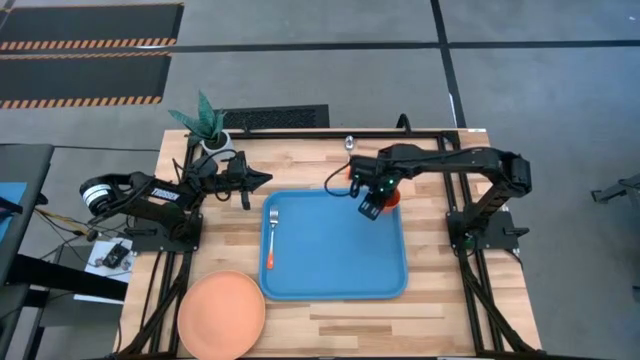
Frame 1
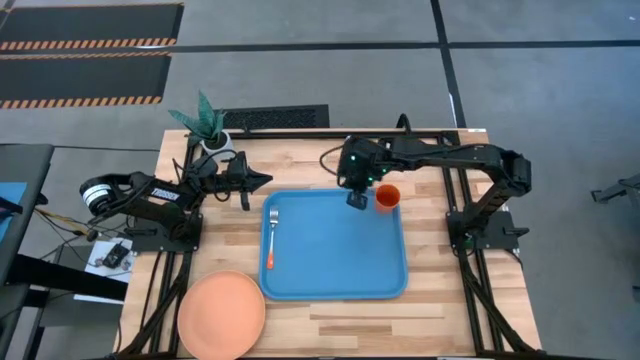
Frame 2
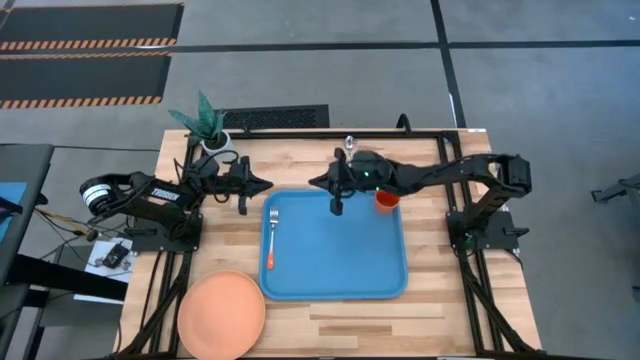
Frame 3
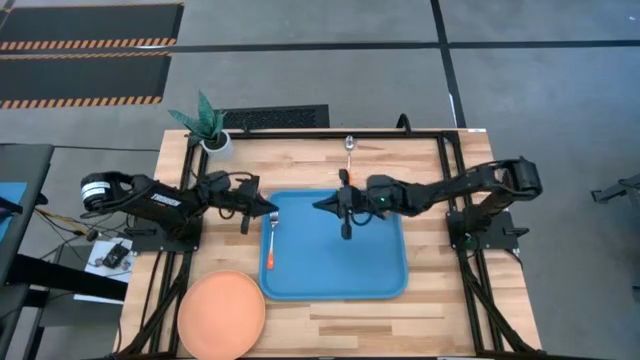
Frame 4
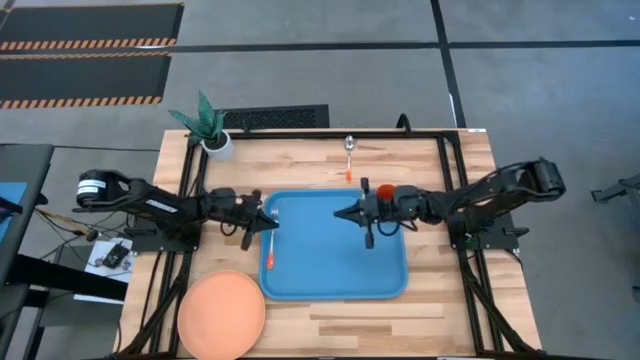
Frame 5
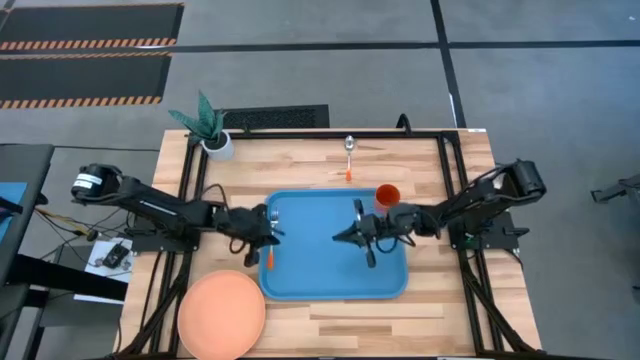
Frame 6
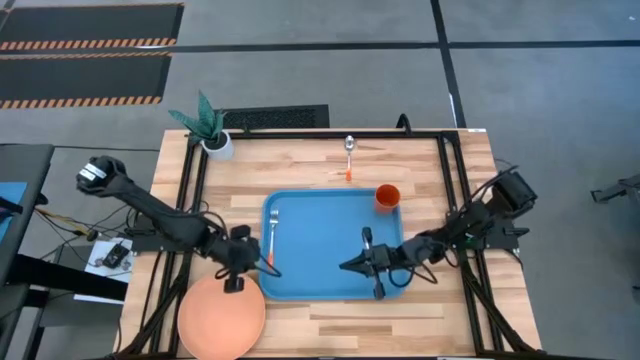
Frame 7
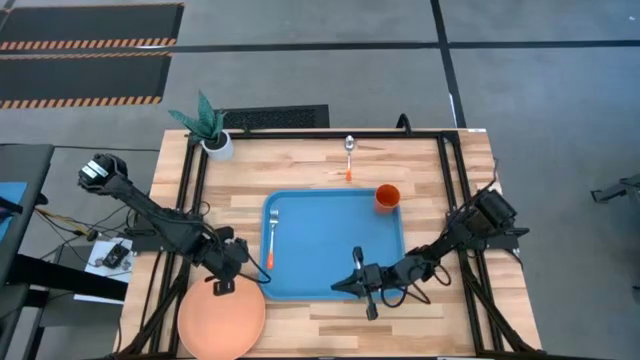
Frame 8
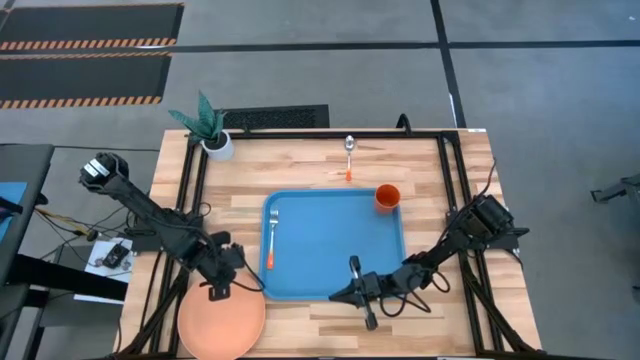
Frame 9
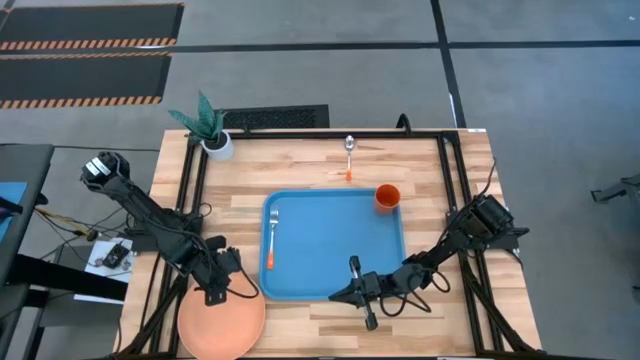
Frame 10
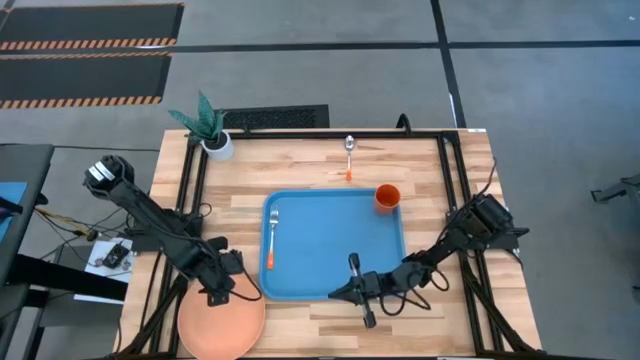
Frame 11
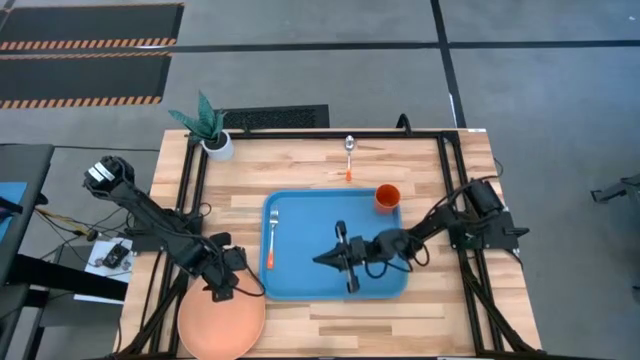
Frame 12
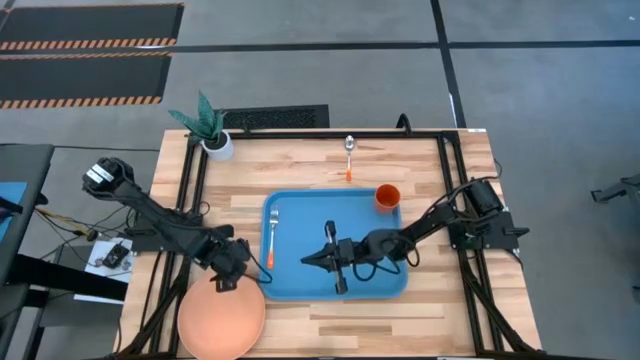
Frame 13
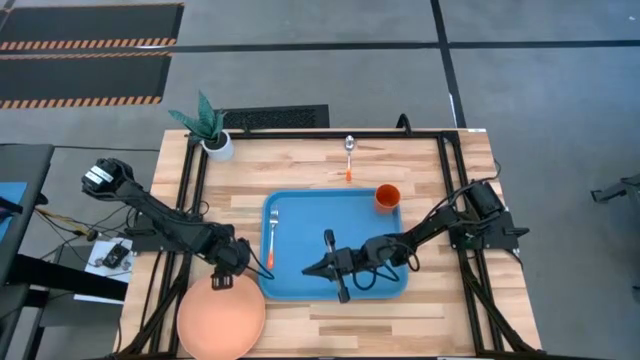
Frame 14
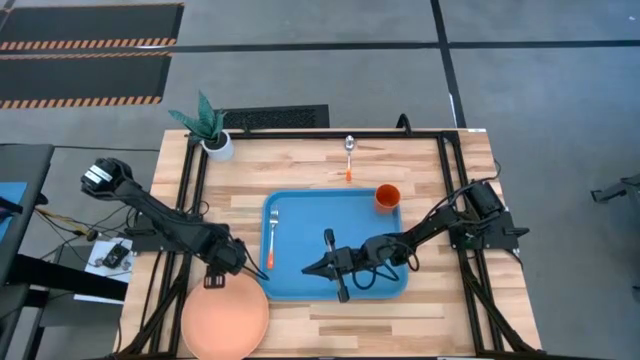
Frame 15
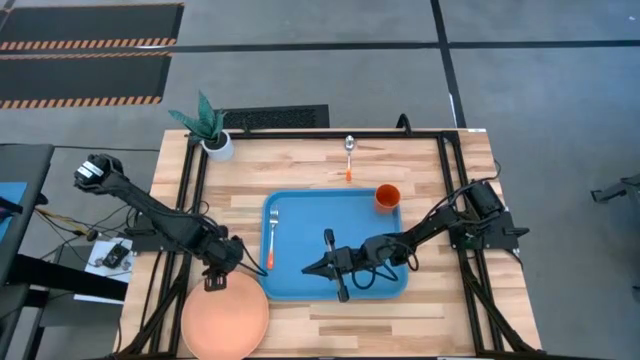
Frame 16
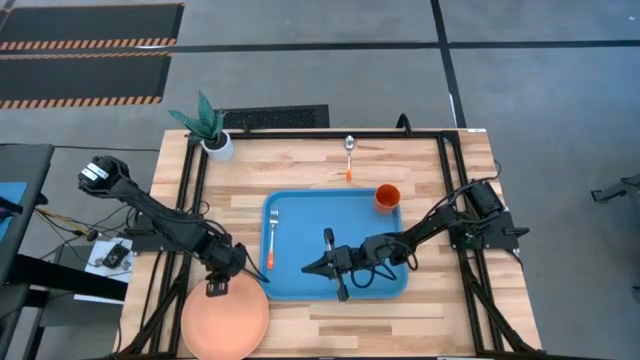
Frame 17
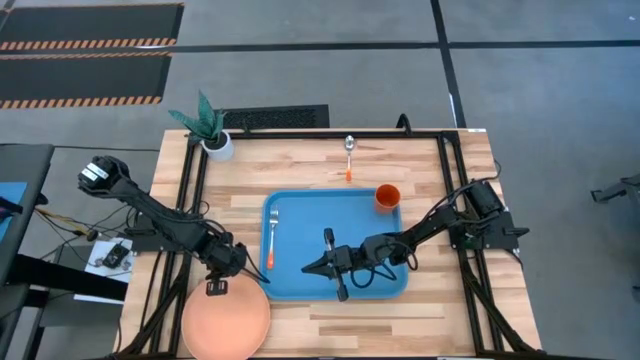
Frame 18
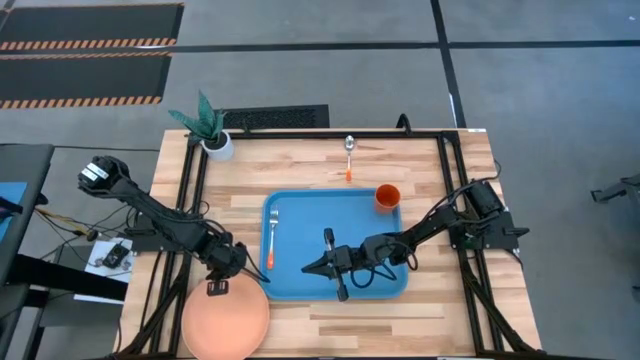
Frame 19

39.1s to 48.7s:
Task: Pick and place plate/cup/fork/spoon on tray
Put the orange plate on the blue serving tray

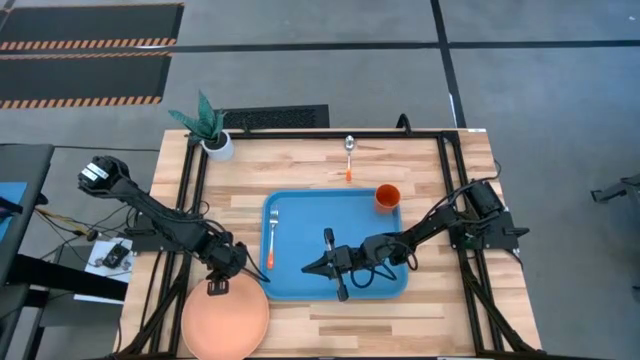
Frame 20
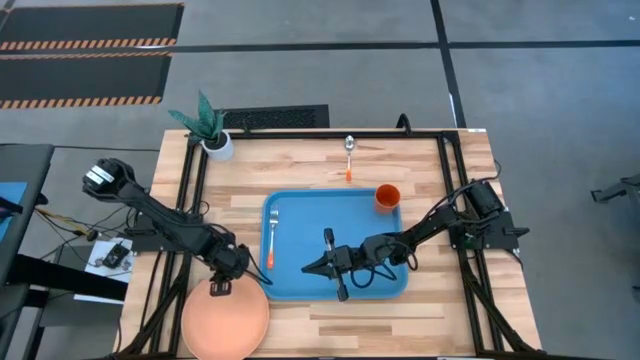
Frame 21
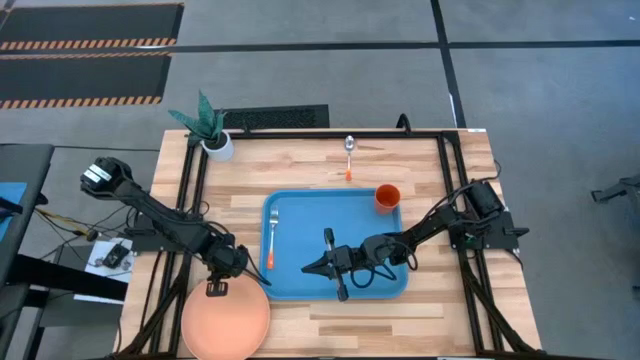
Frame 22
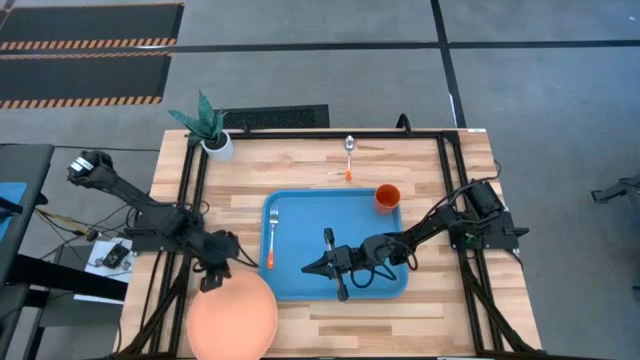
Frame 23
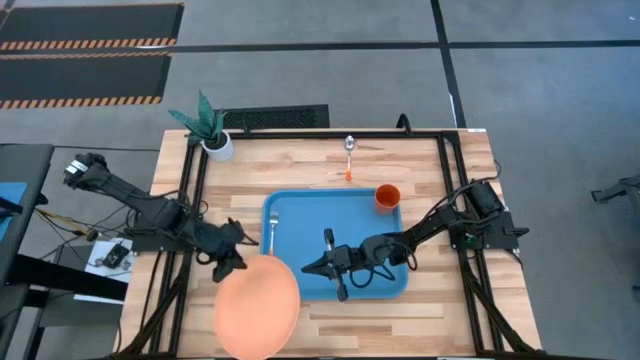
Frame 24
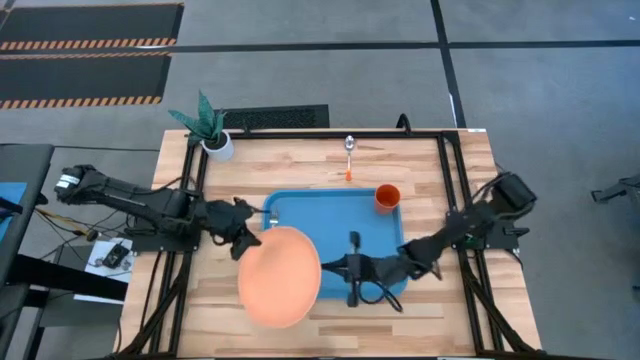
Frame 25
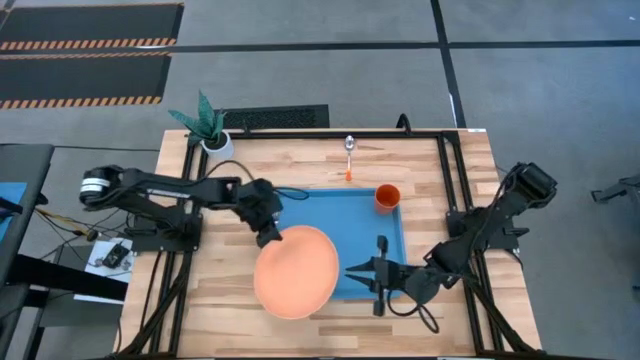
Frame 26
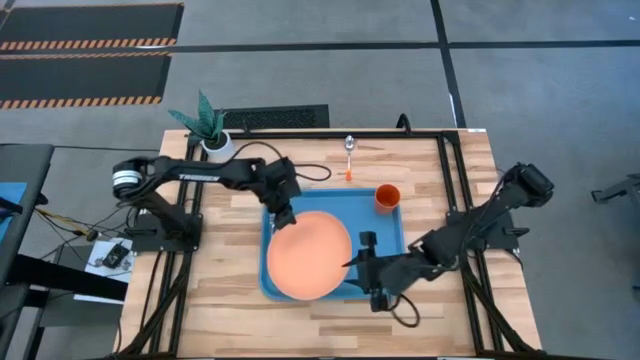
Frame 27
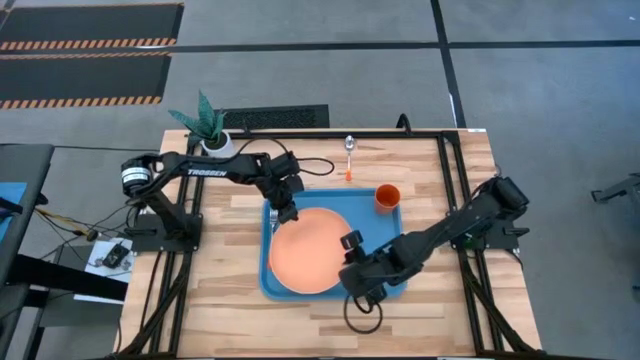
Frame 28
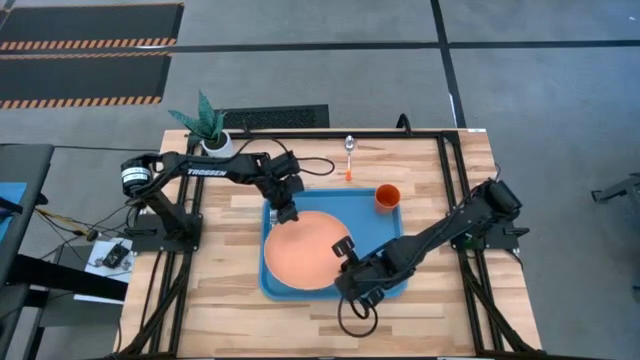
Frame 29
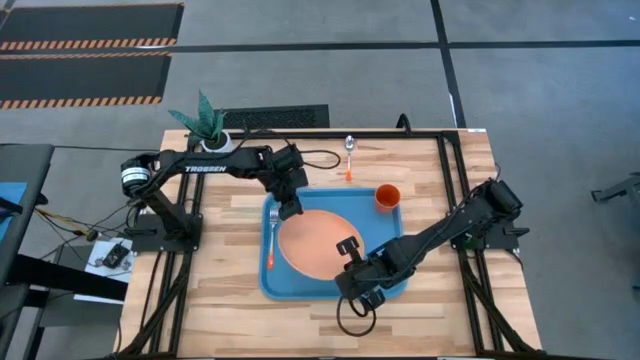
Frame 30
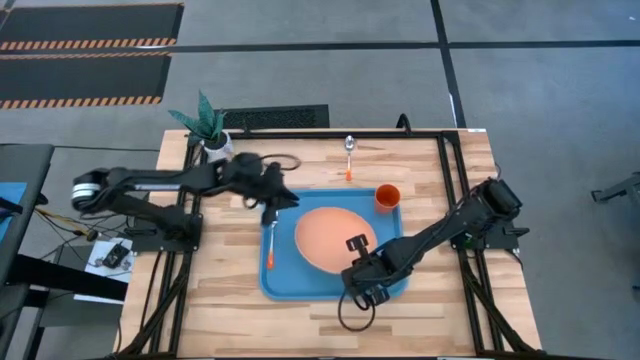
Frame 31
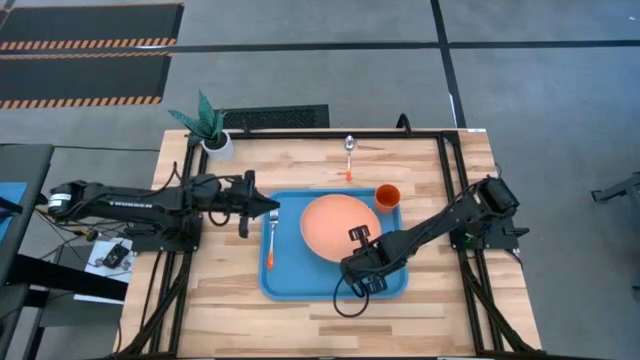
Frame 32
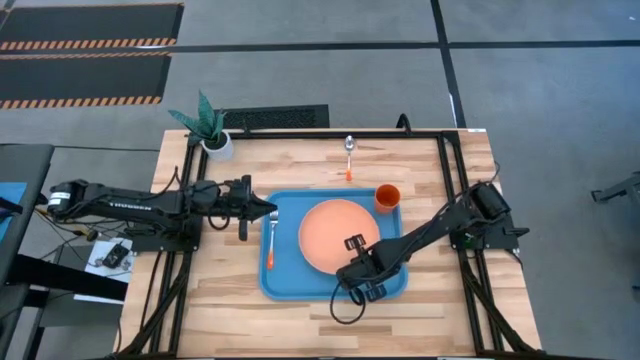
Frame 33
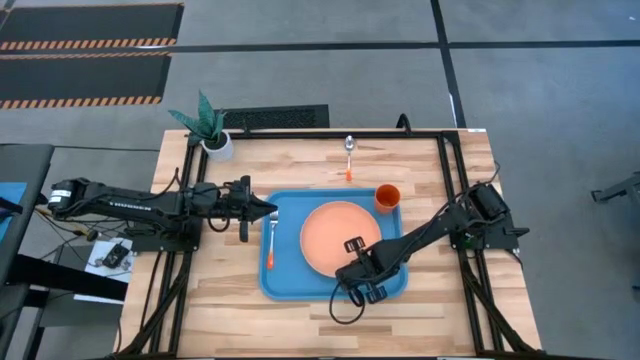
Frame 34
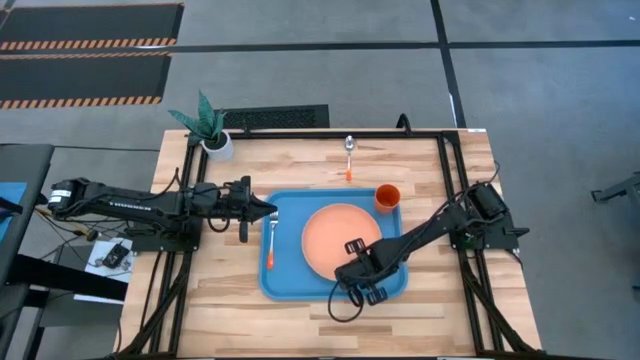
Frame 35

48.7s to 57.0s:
Put the orange plate on the blue serving tray

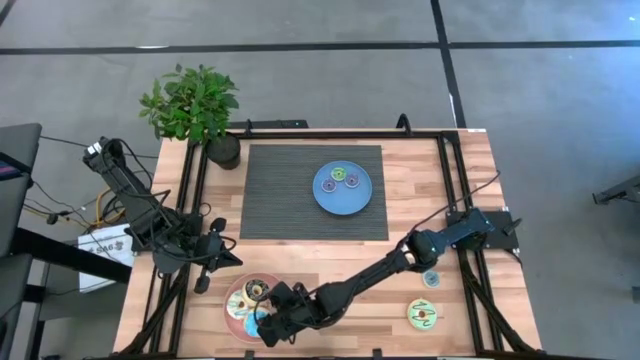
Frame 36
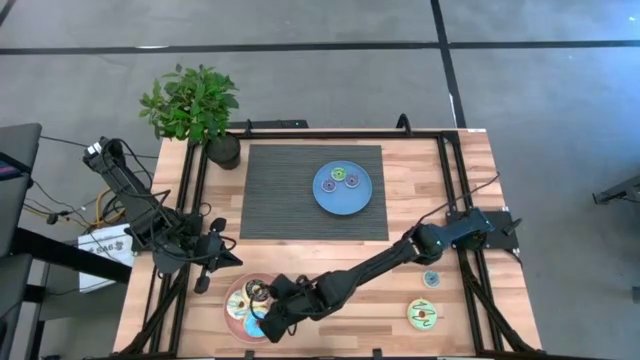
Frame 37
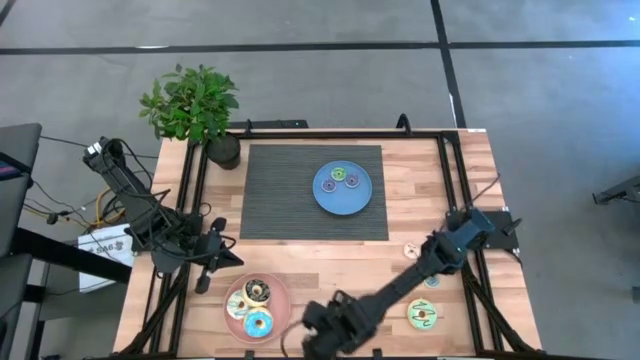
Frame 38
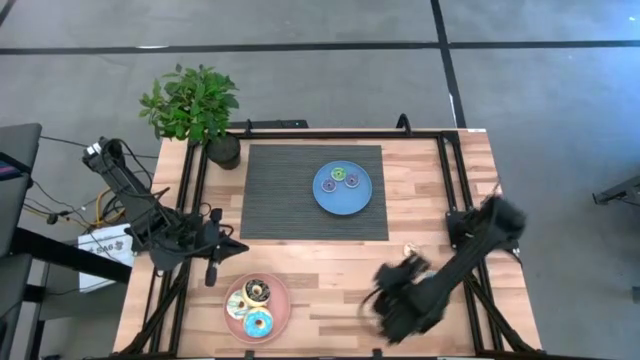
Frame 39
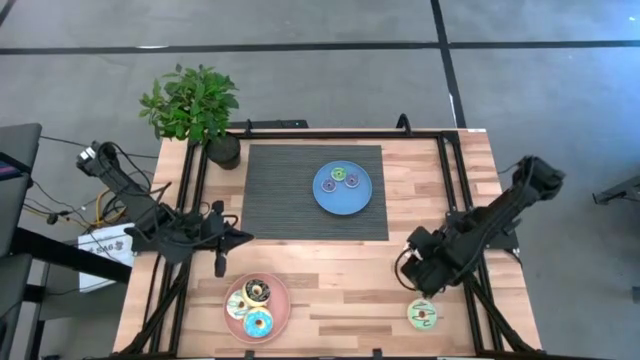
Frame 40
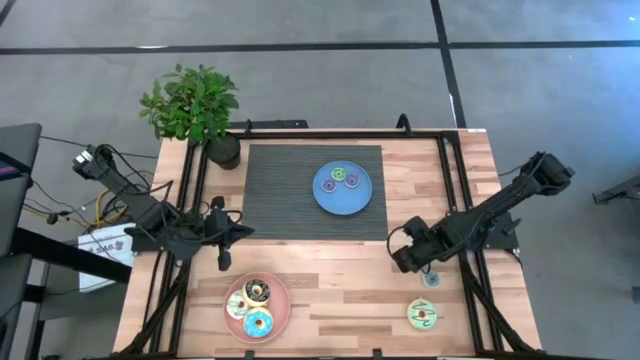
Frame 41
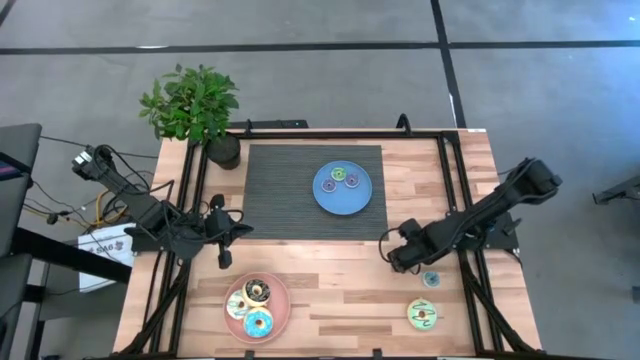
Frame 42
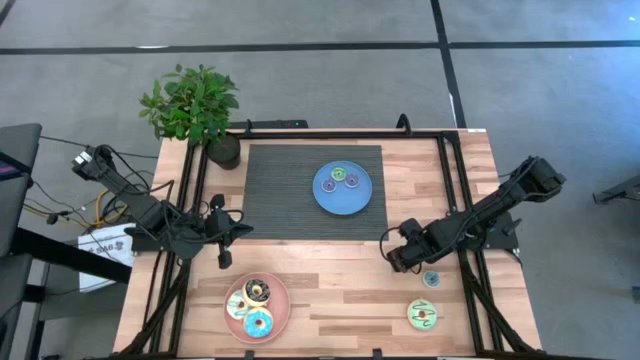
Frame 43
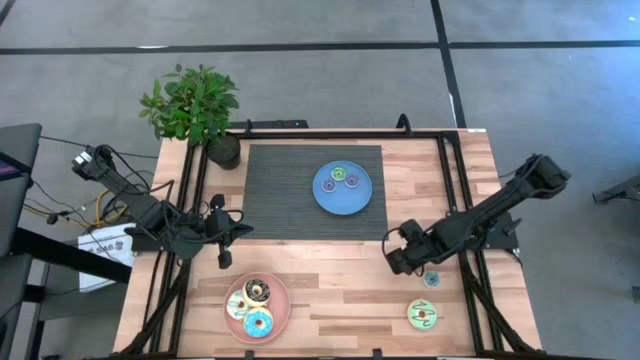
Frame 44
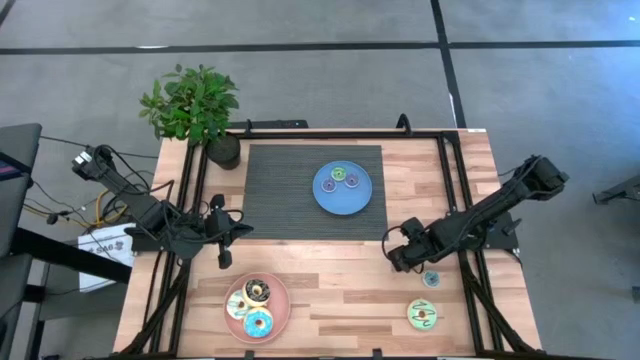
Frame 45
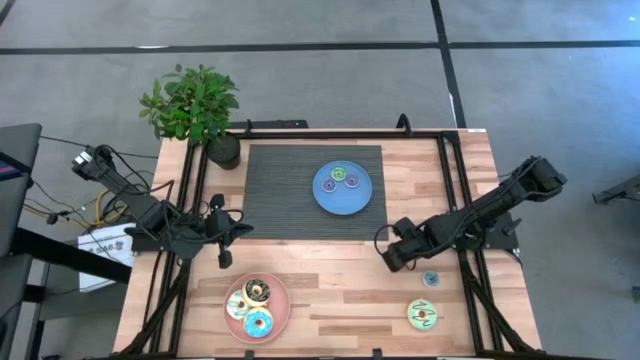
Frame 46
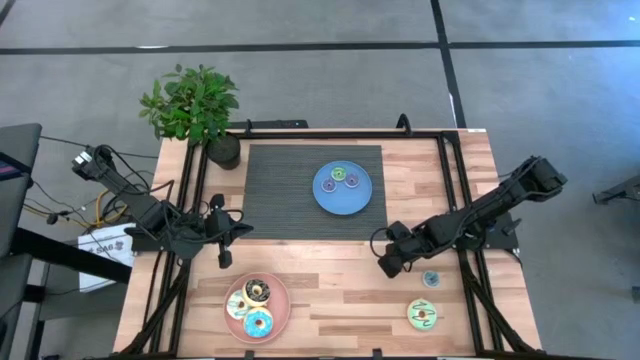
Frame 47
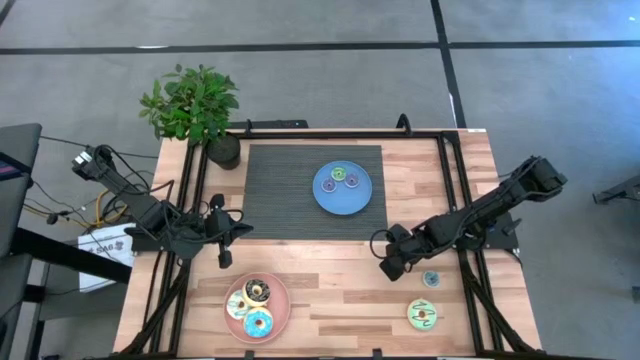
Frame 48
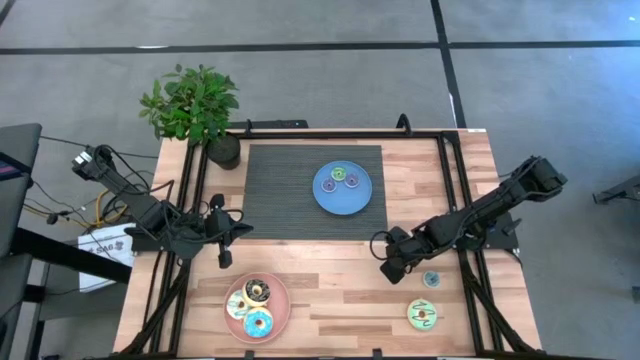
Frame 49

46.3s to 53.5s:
Task: Pick & Place donuts
Put the small white donut on the blue plate
